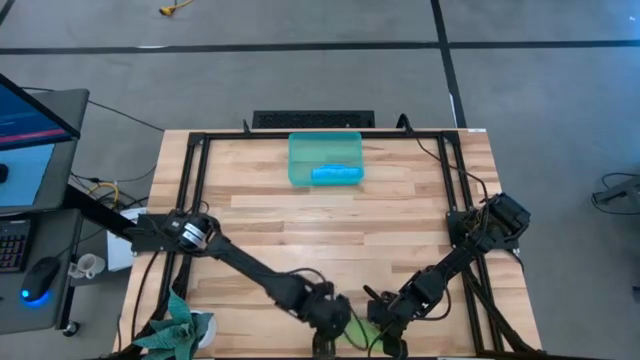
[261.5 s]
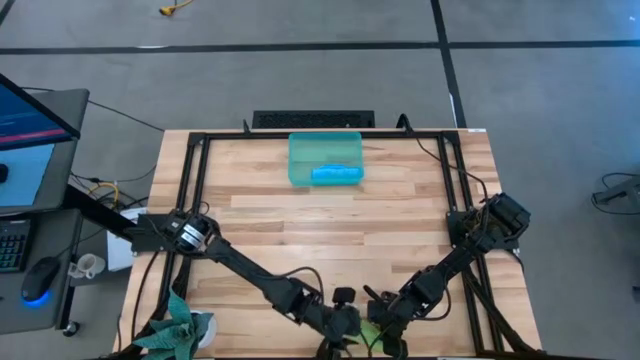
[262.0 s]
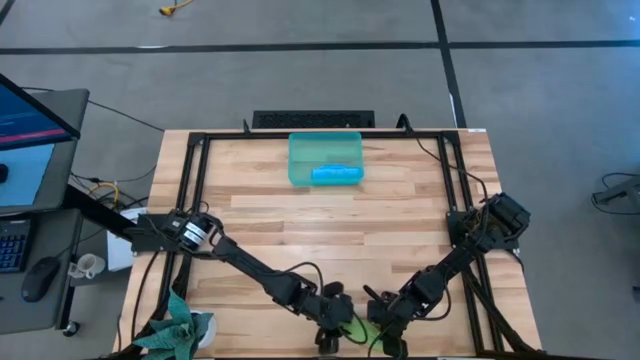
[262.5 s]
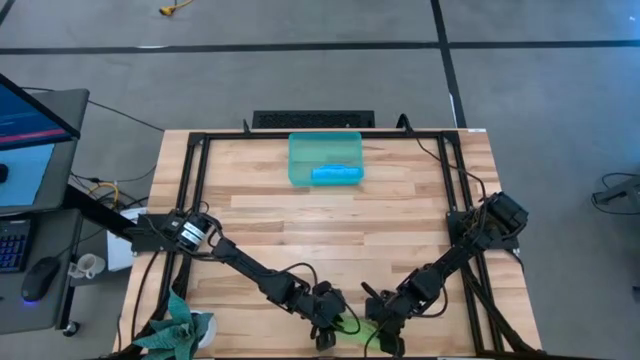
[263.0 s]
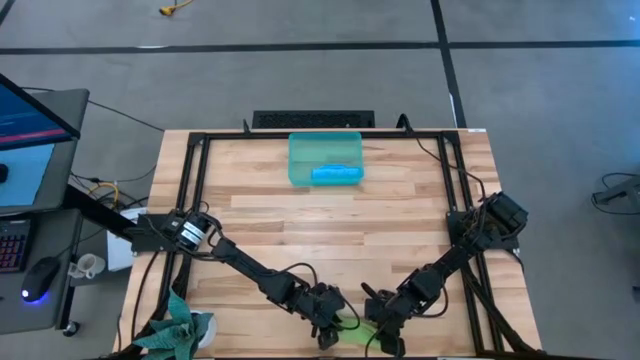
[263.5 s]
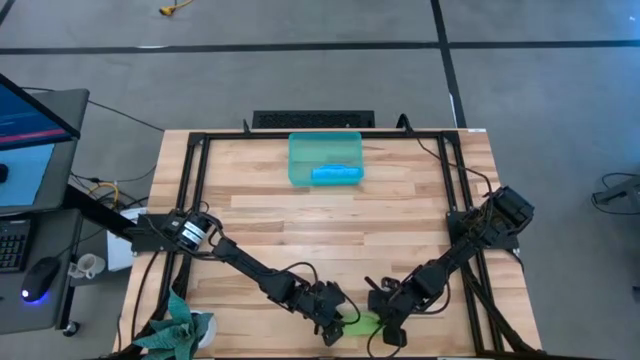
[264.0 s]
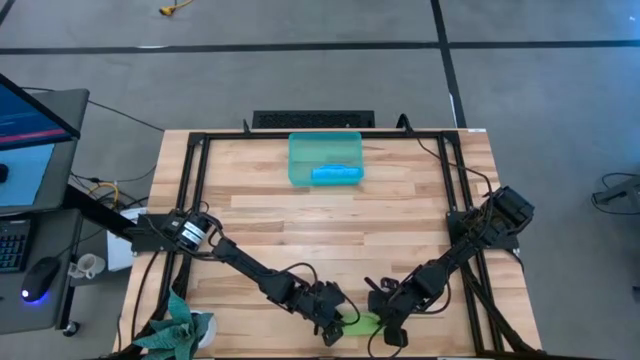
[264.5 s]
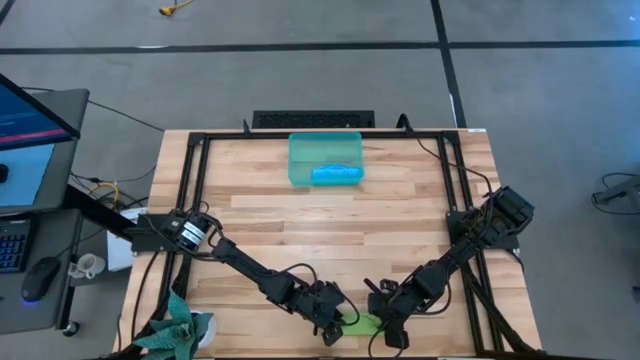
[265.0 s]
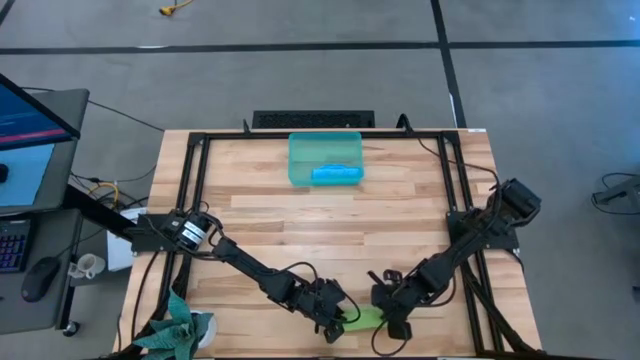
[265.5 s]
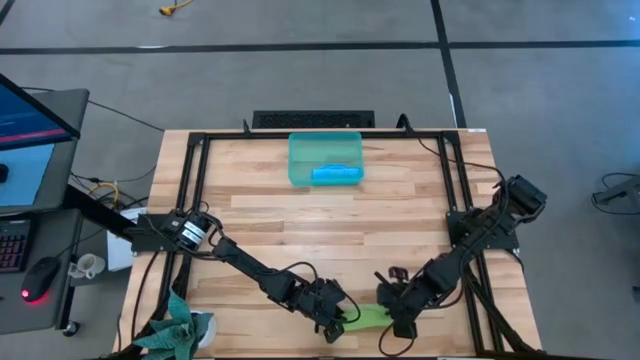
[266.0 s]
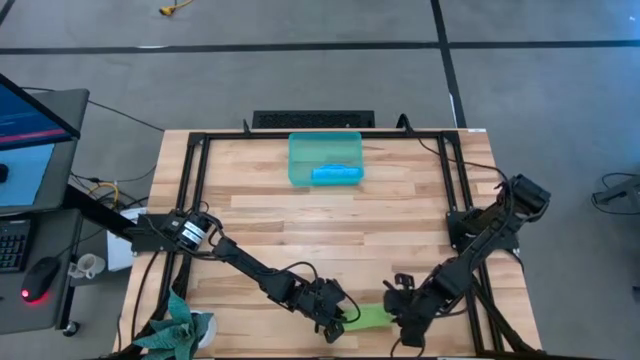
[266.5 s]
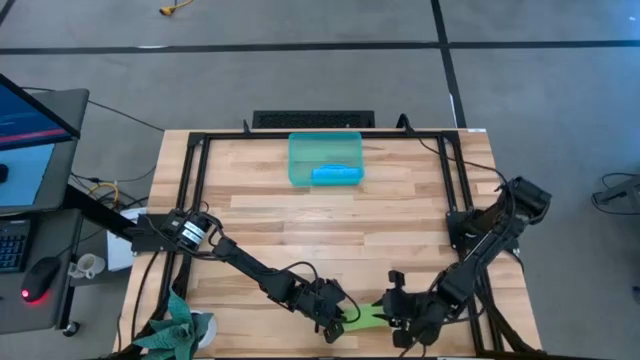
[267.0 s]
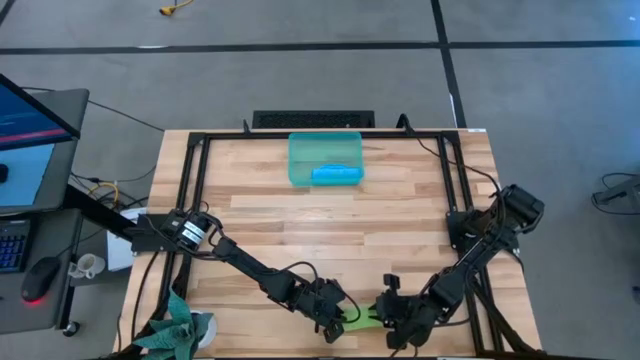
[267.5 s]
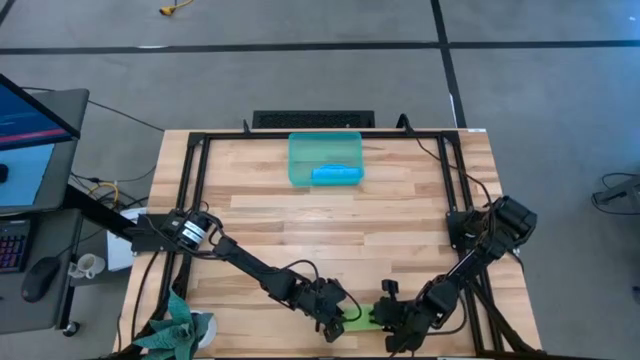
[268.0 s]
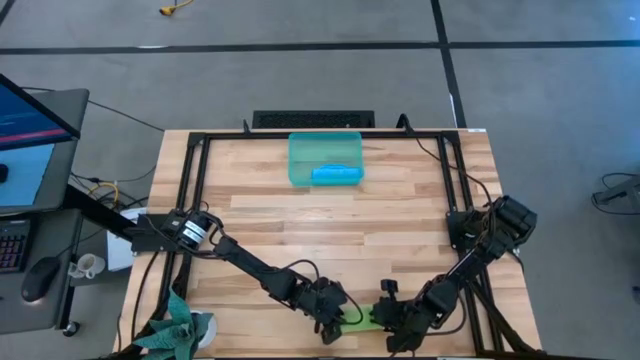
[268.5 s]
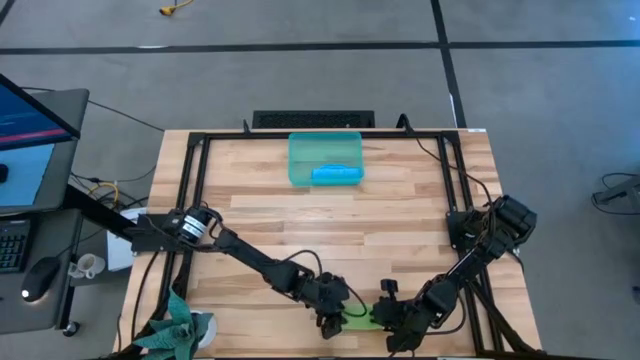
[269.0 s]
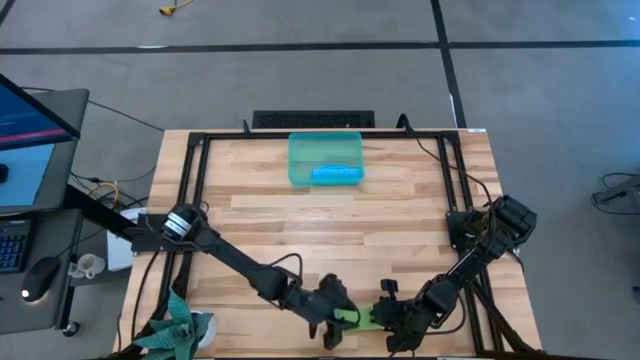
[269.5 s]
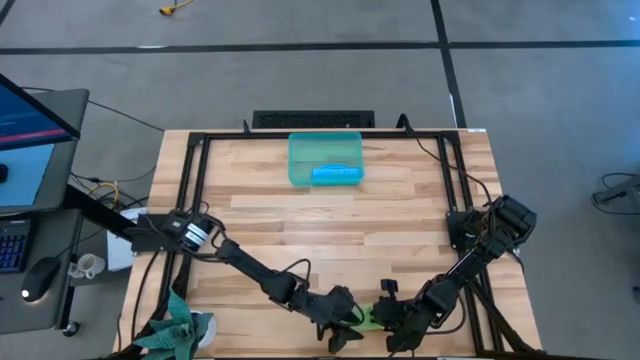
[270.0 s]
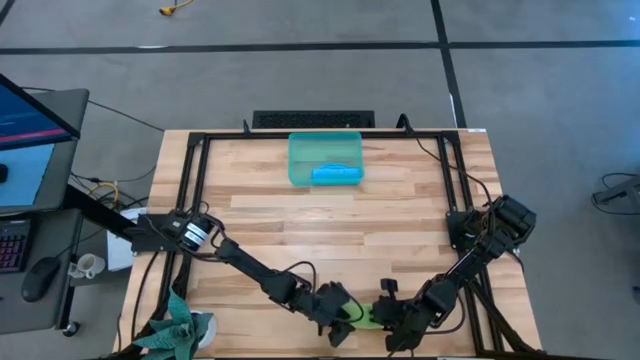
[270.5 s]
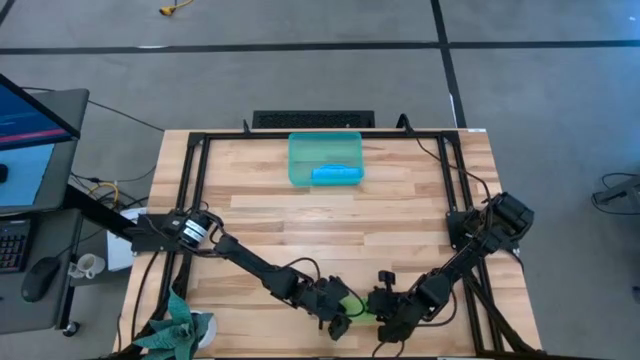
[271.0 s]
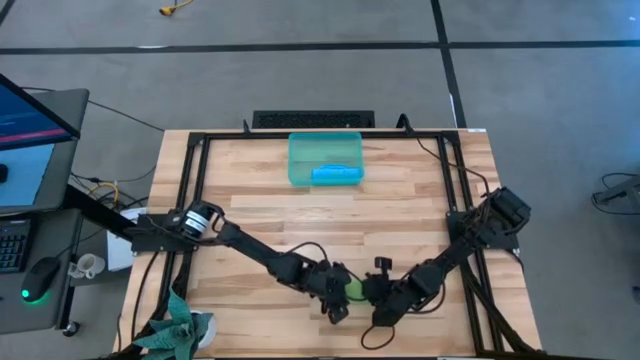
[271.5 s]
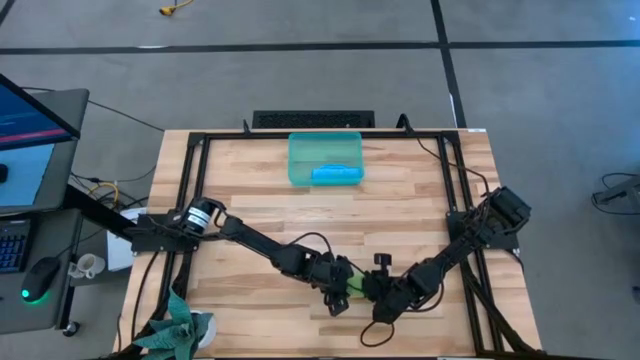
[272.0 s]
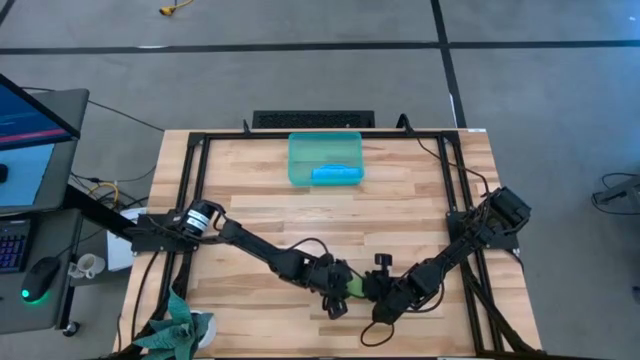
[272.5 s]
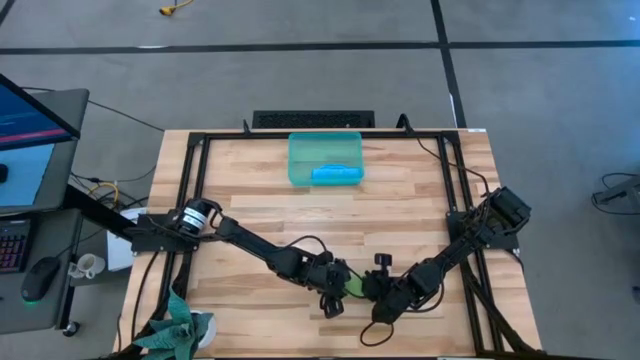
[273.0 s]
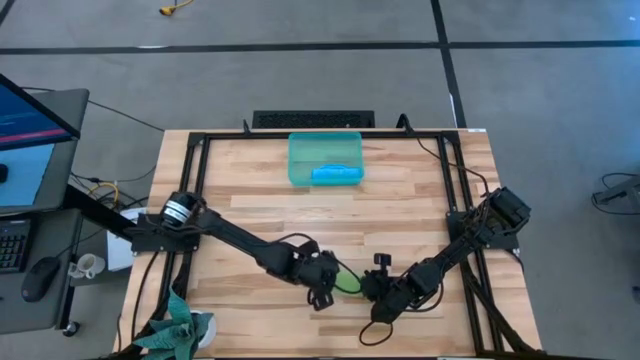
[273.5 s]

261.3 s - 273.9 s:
Task: Roll microfiber towels into tight, uniform cylinder then place into a basket
Put the green microfiber cloth into the blue bin

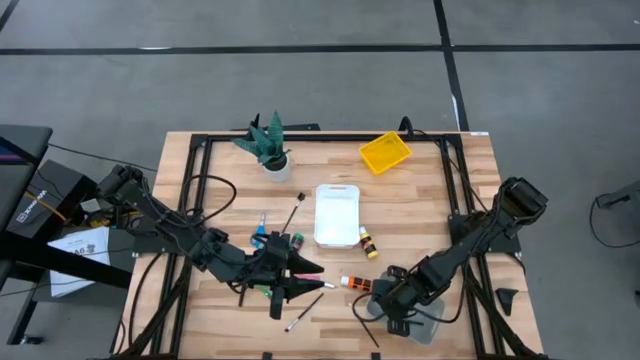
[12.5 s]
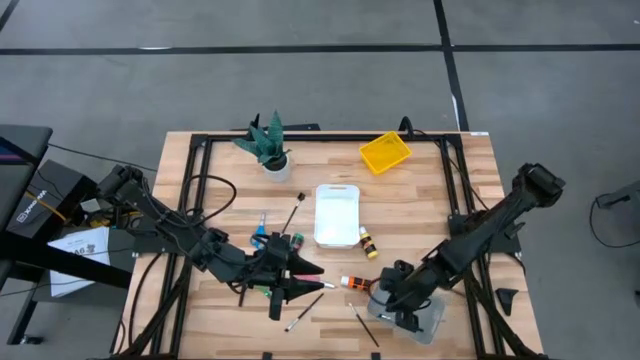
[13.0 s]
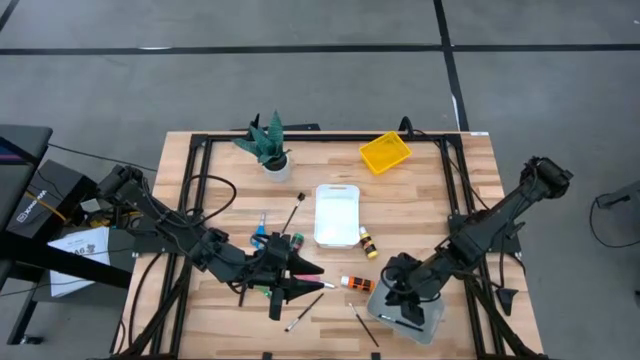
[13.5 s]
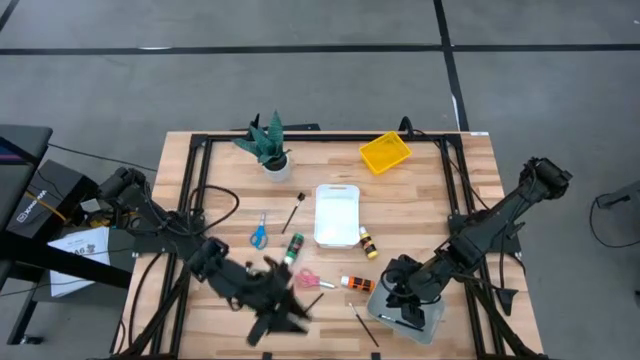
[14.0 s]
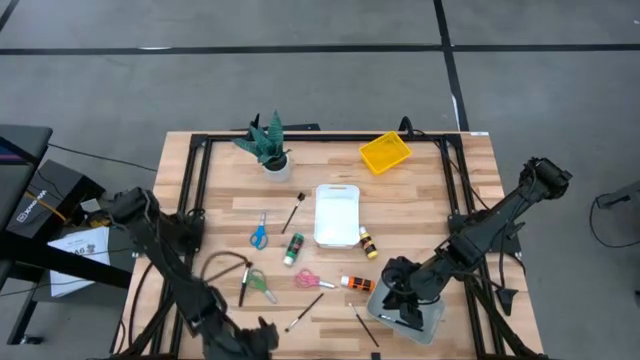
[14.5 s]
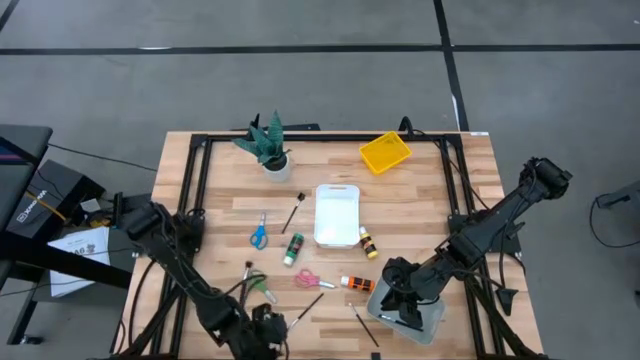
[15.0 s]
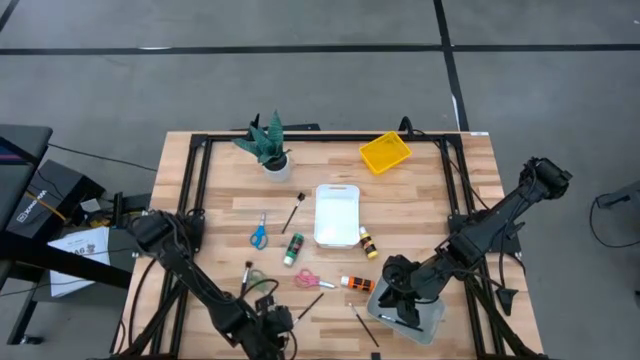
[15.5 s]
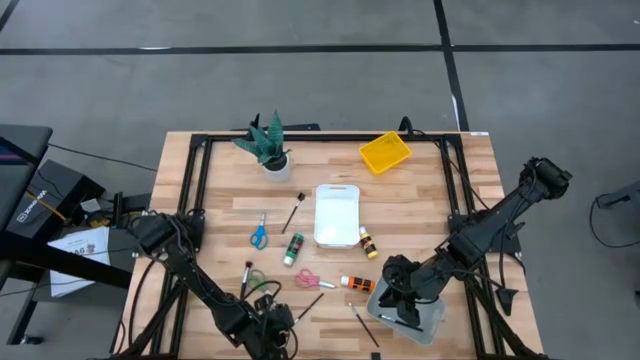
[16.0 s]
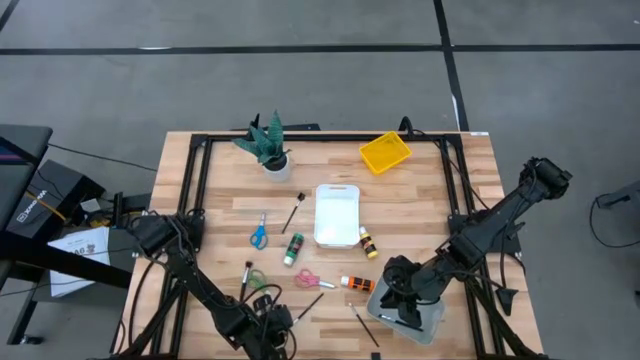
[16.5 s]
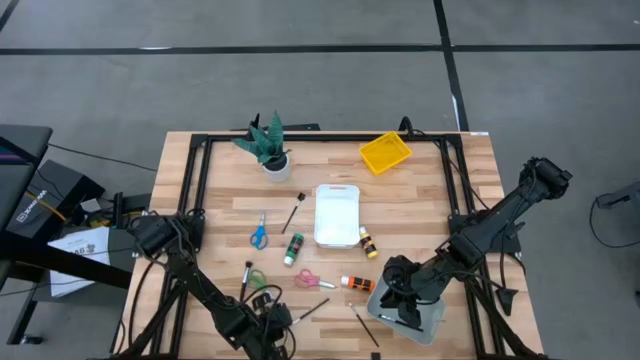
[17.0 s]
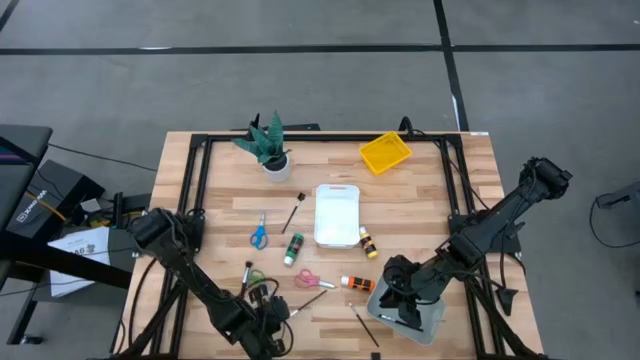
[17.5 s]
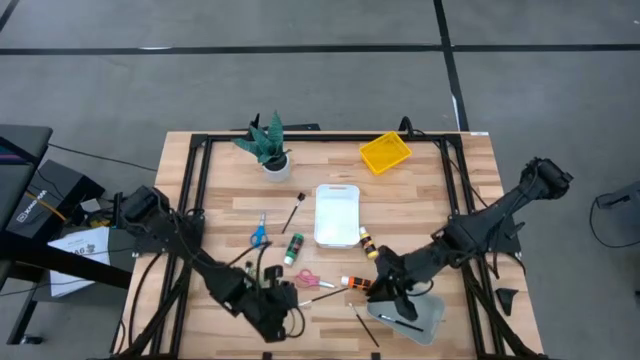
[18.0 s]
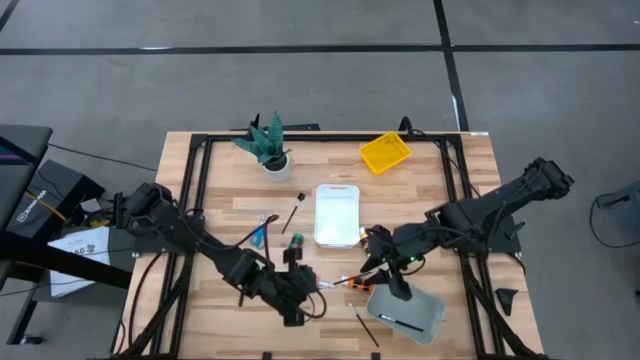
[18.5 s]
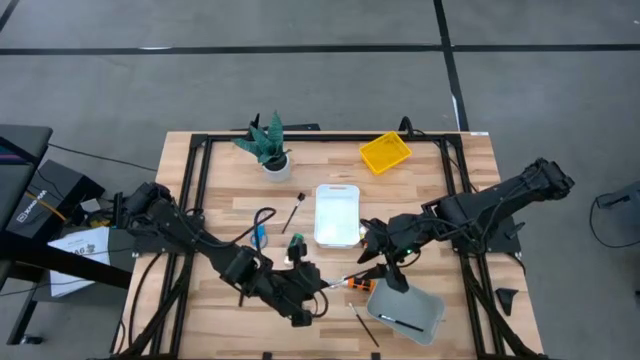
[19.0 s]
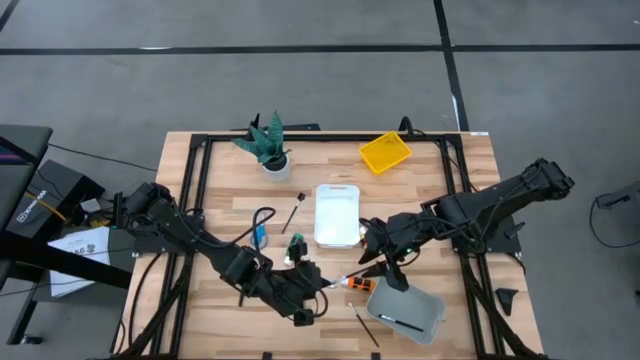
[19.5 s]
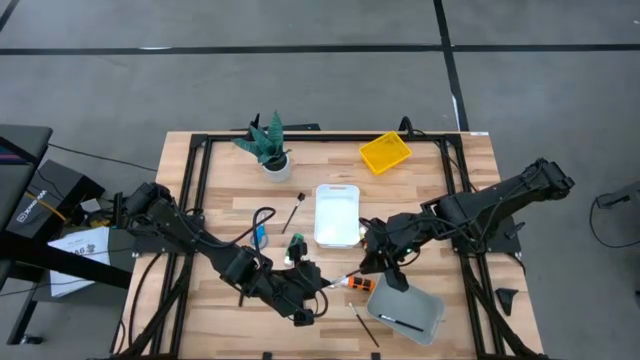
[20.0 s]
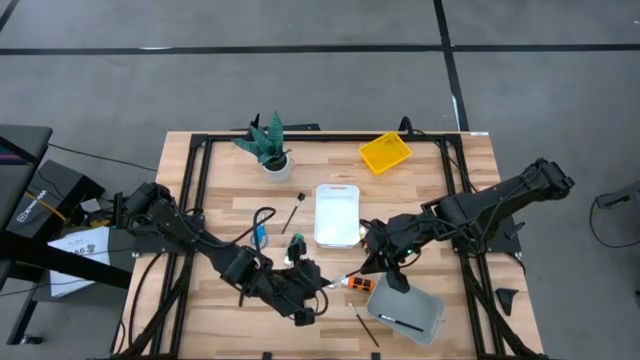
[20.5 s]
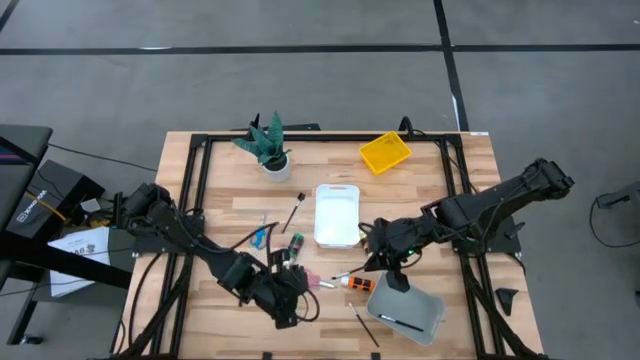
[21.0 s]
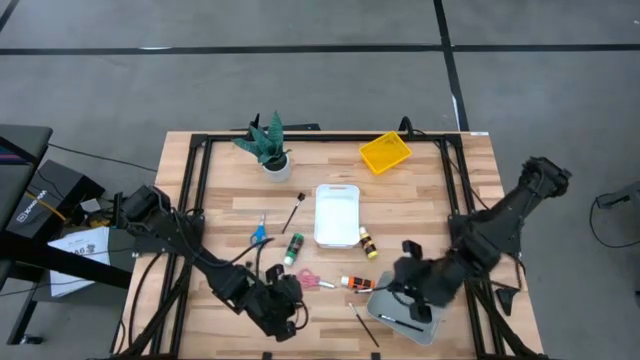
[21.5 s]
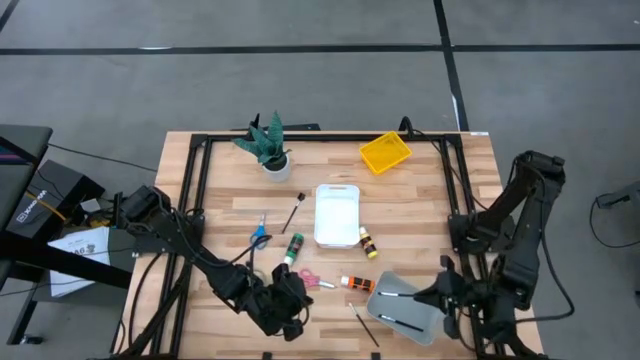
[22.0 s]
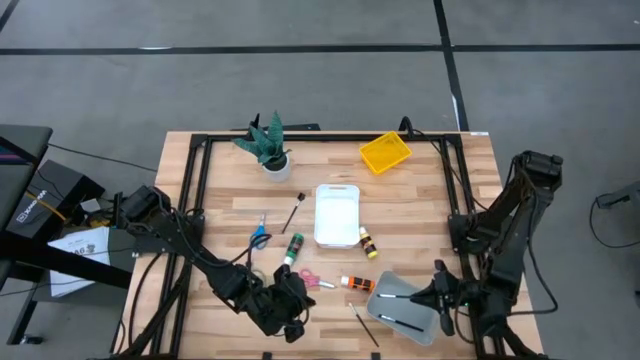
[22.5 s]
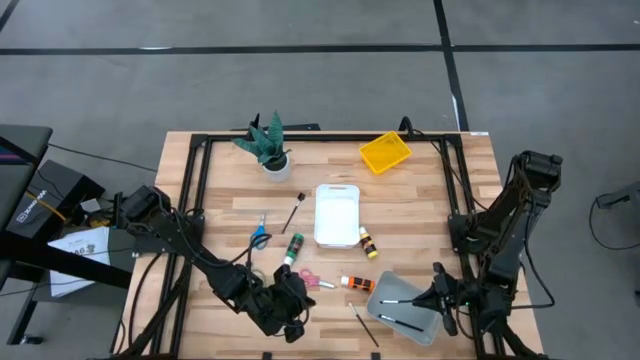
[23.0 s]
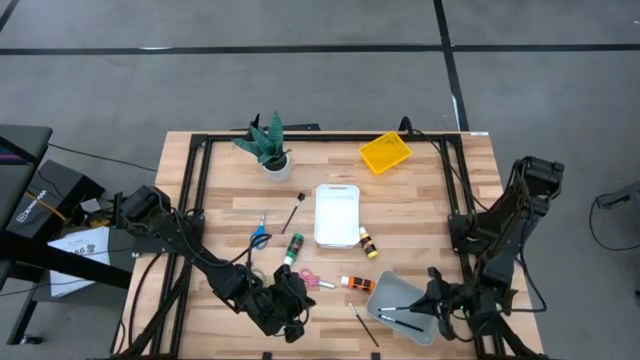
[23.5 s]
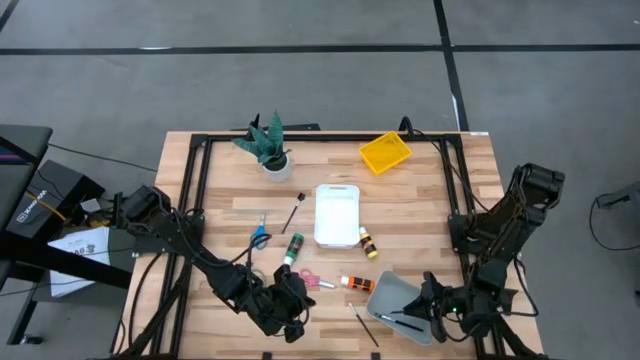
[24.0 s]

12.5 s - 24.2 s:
Task: Pick & Place Paint Supplies
Put the left eyeshadow brush into the gray bin
